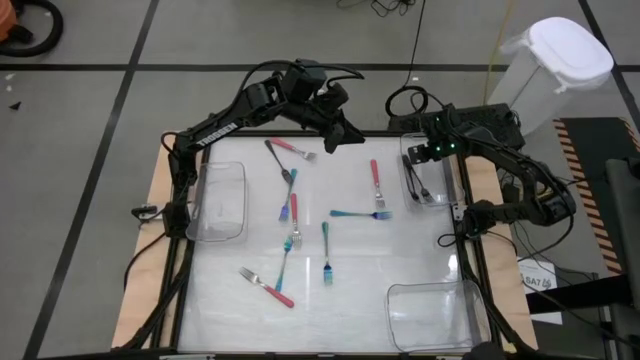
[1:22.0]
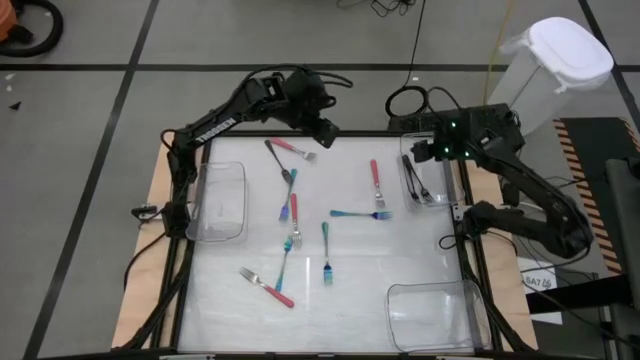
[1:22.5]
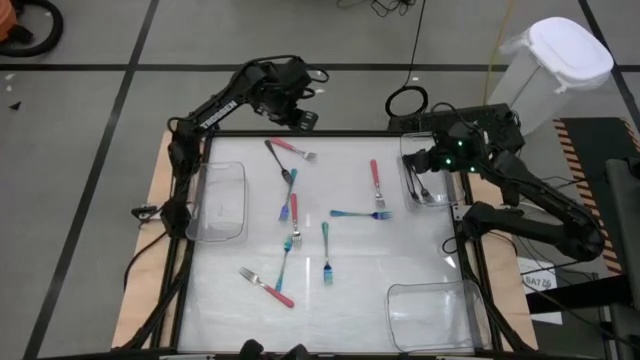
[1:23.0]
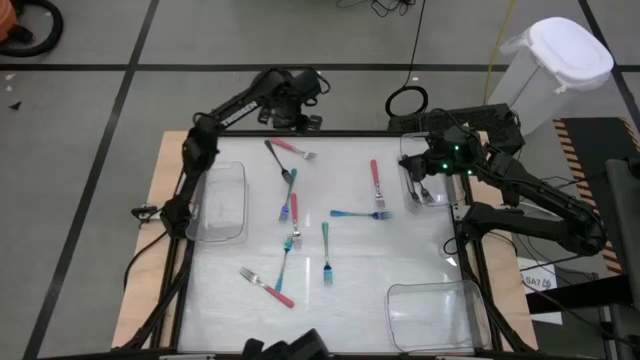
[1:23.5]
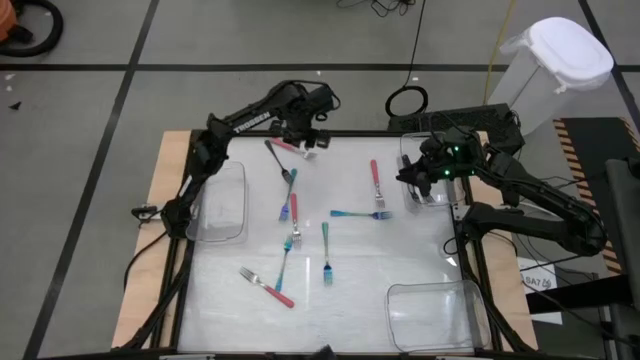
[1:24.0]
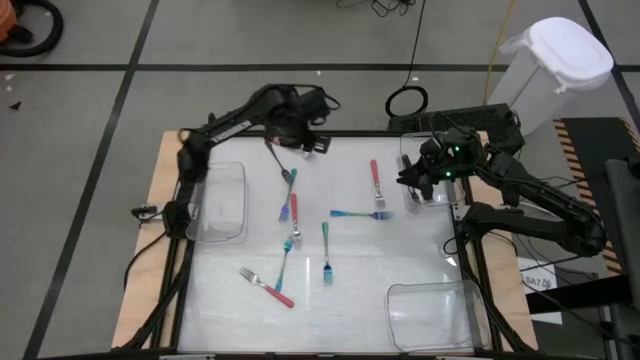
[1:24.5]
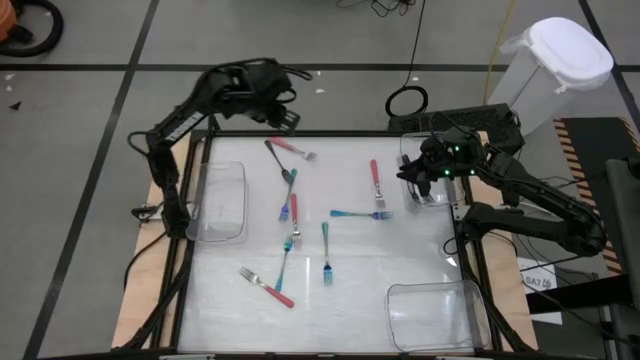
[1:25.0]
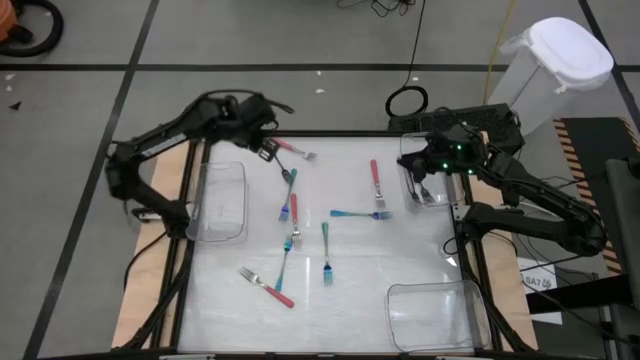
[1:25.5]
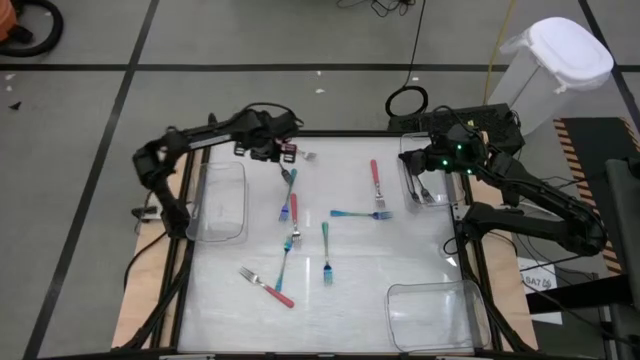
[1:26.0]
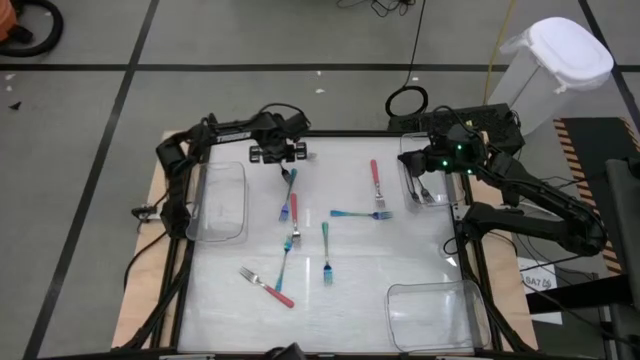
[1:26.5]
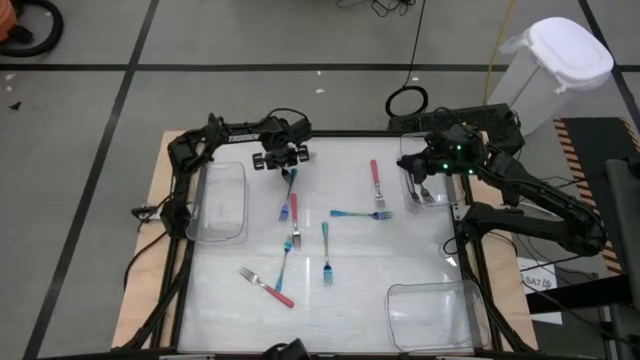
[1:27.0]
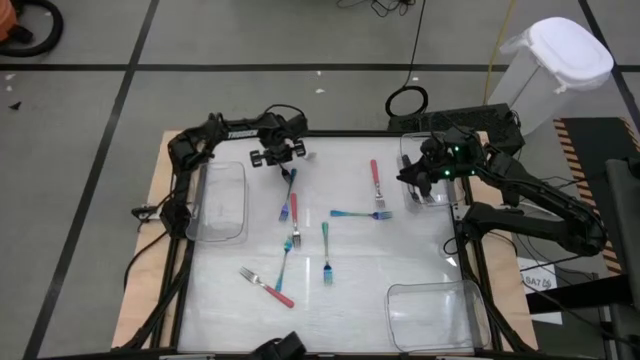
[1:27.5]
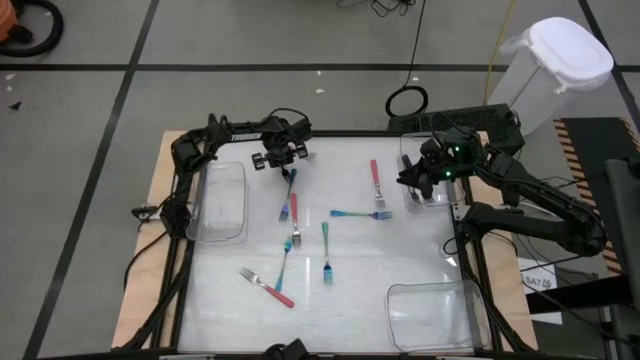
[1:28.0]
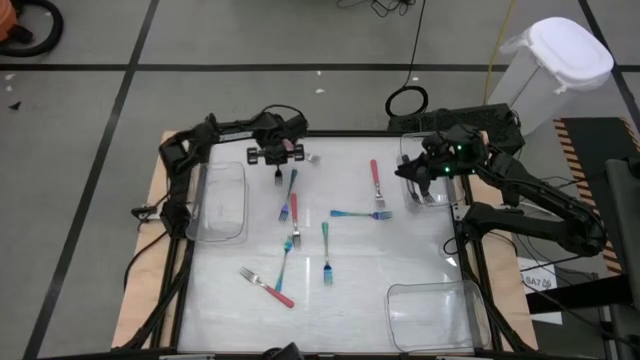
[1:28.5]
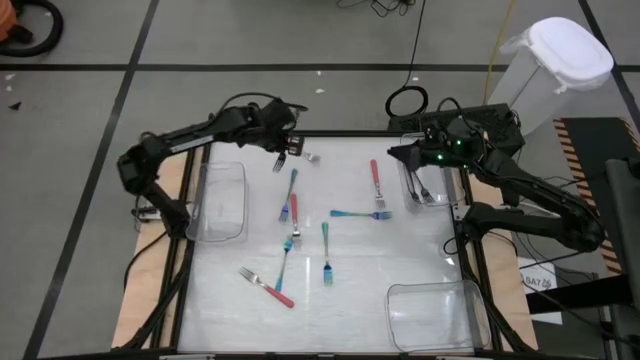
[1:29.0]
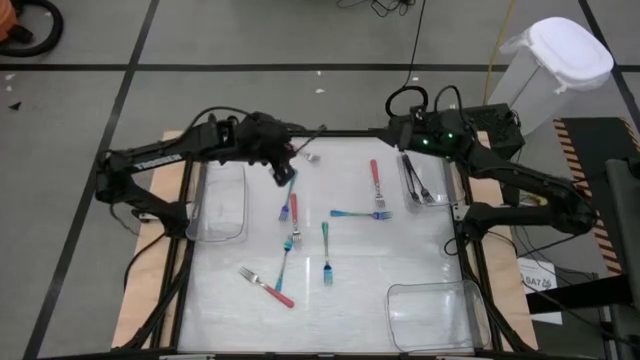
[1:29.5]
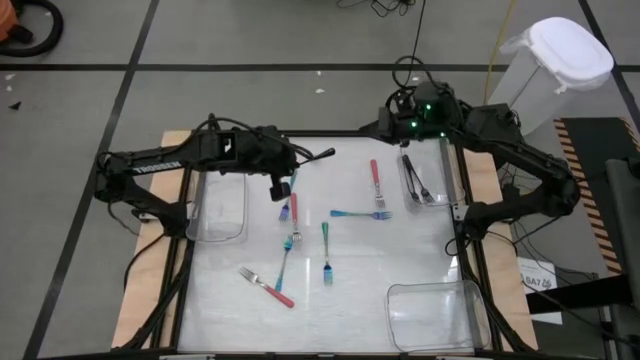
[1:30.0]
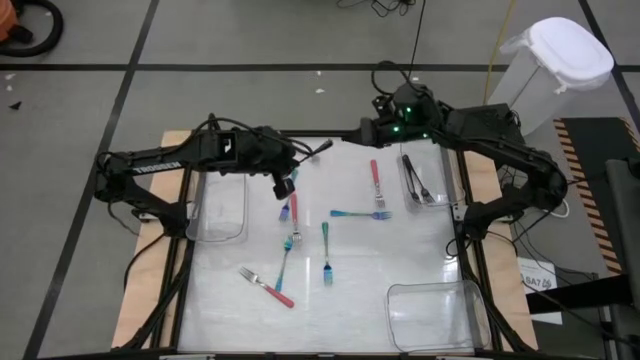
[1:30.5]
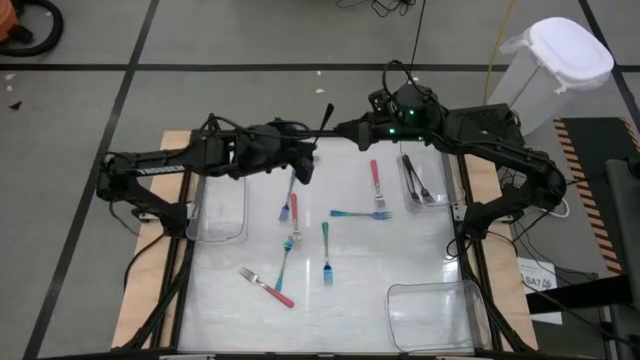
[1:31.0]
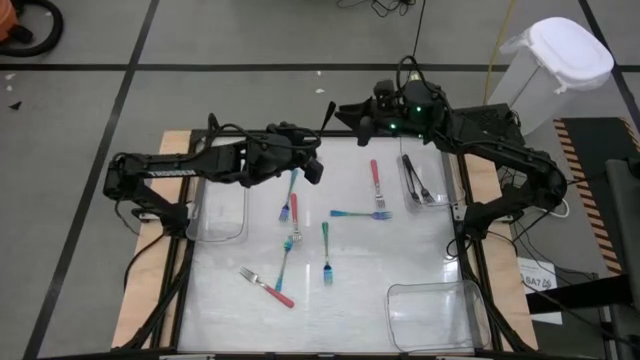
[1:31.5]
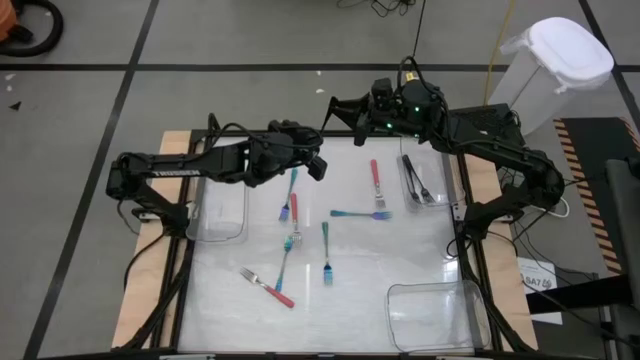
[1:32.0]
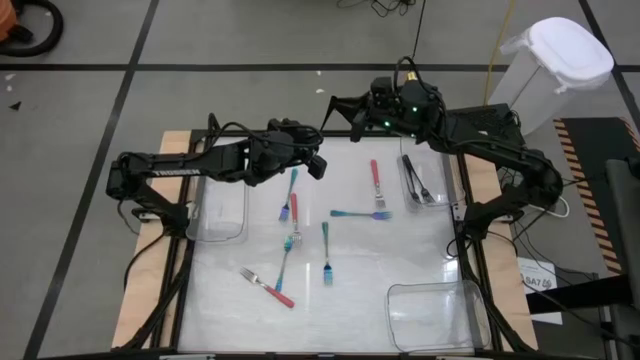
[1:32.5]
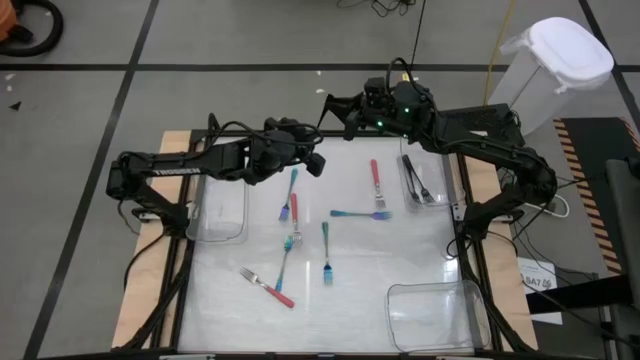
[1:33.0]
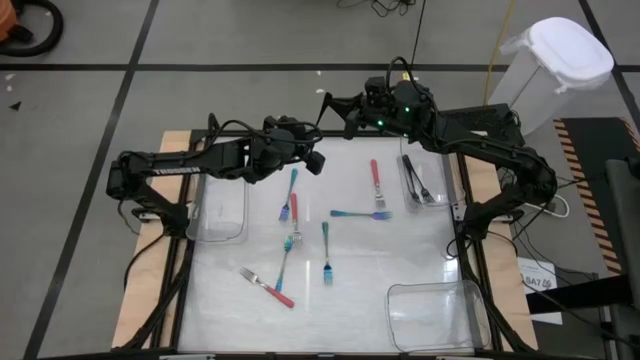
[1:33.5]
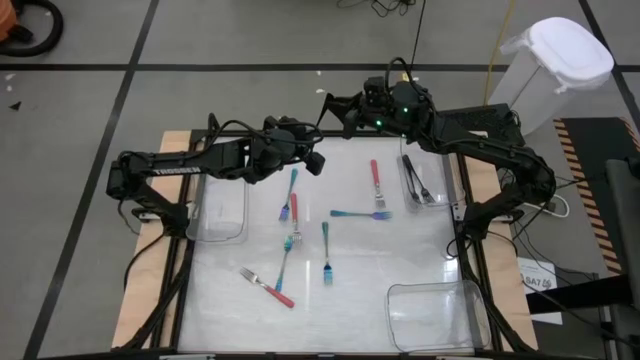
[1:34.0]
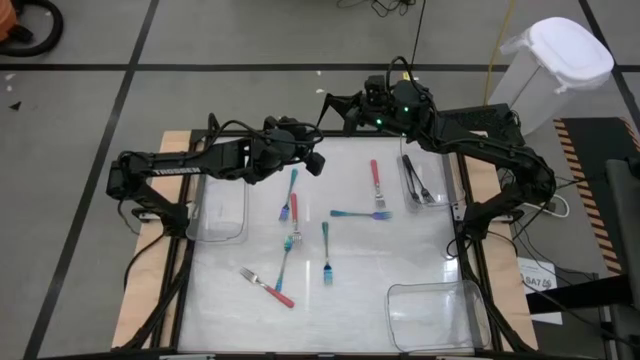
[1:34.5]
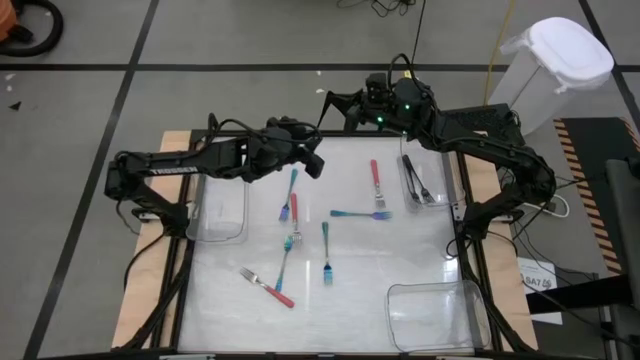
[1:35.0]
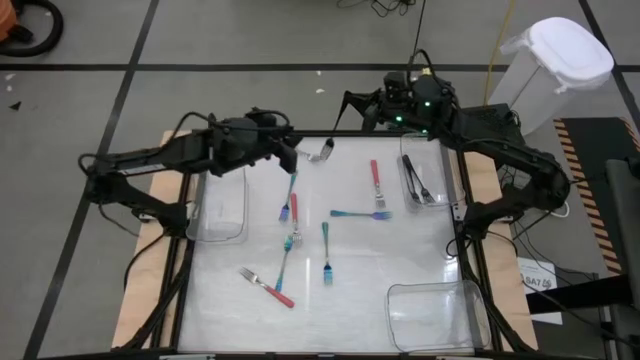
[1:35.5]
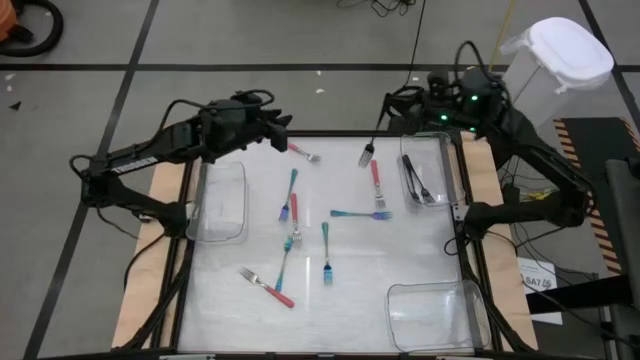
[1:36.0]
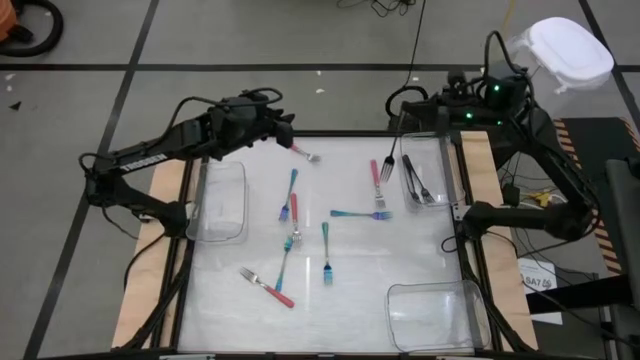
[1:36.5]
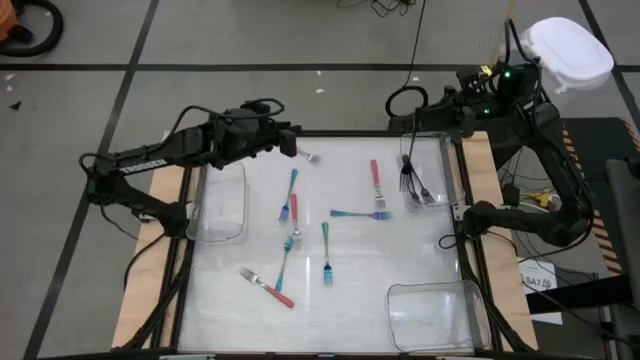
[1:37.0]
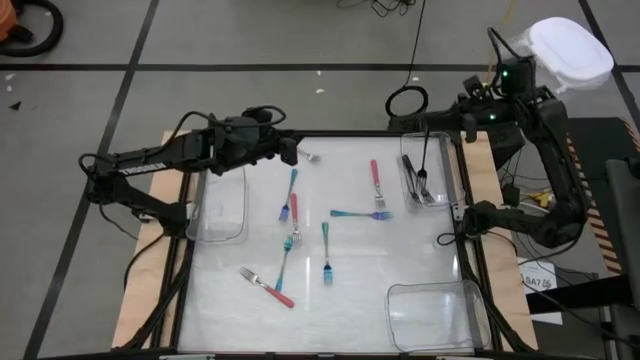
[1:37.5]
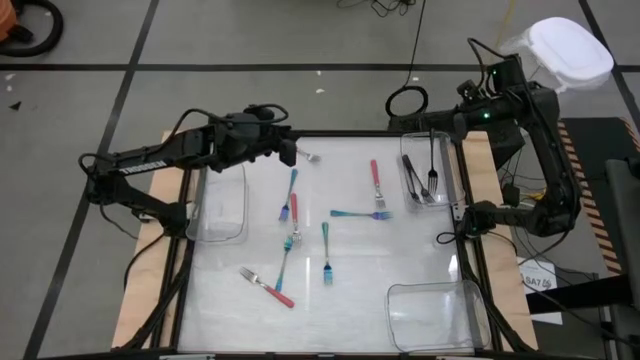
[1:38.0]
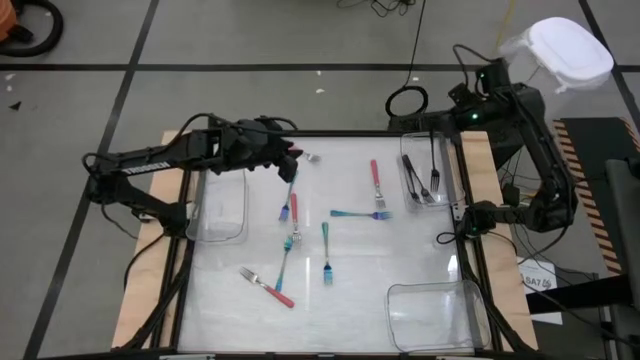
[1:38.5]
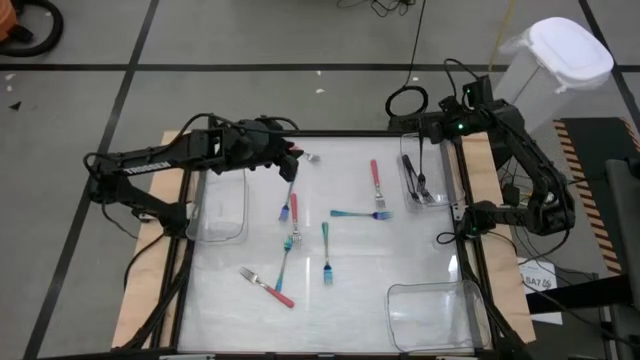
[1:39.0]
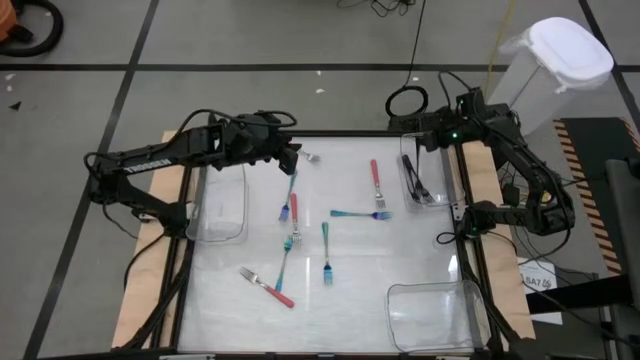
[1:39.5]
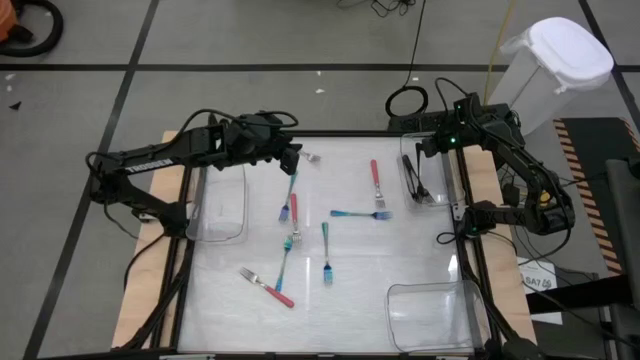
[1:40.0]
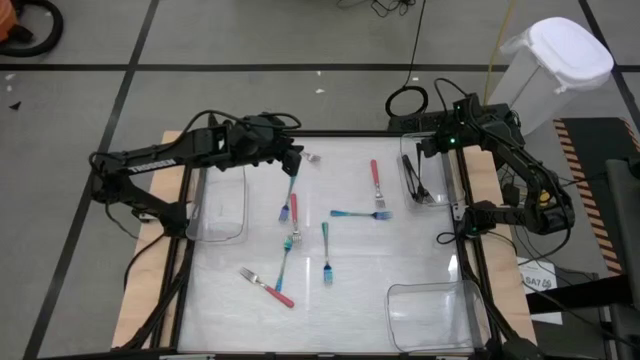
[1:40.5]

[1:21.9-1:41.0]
Task: Sort silverware by color (type)
Put the black fork into the top right transparent bin
